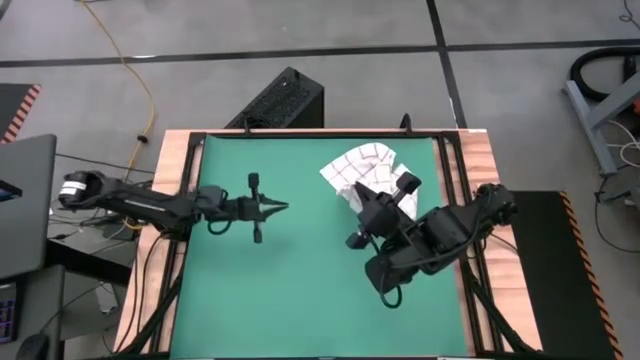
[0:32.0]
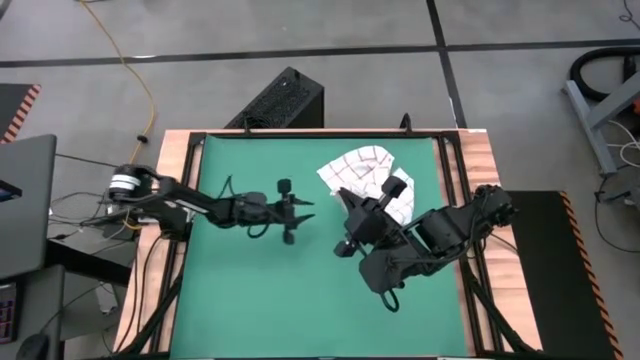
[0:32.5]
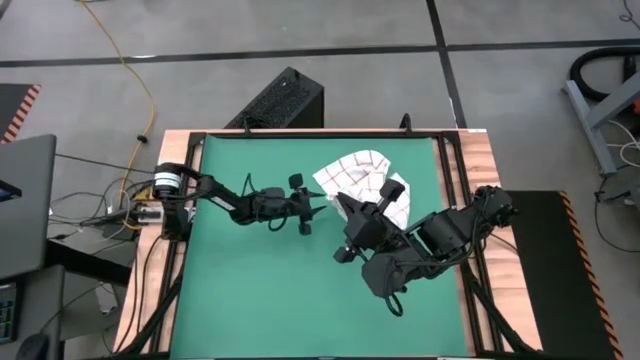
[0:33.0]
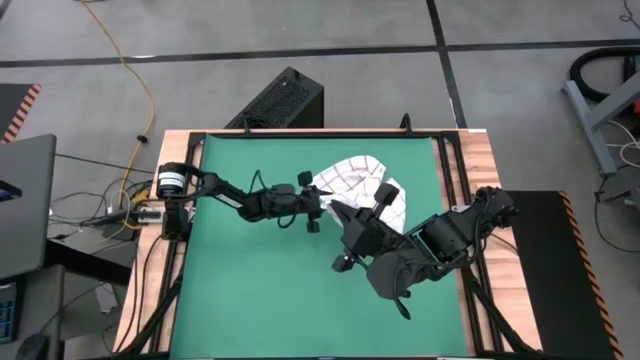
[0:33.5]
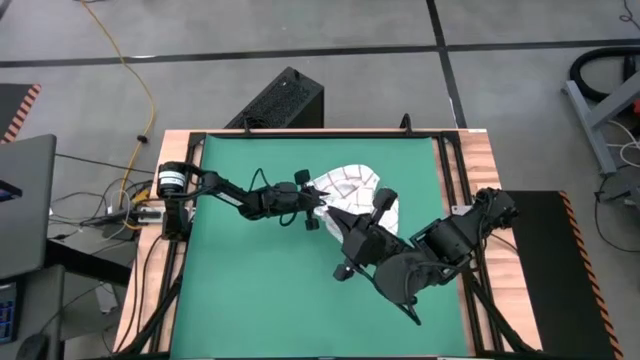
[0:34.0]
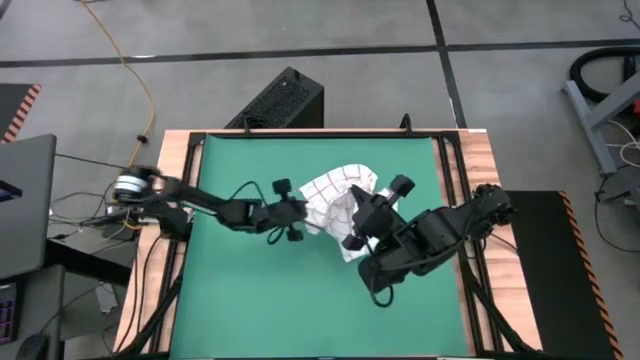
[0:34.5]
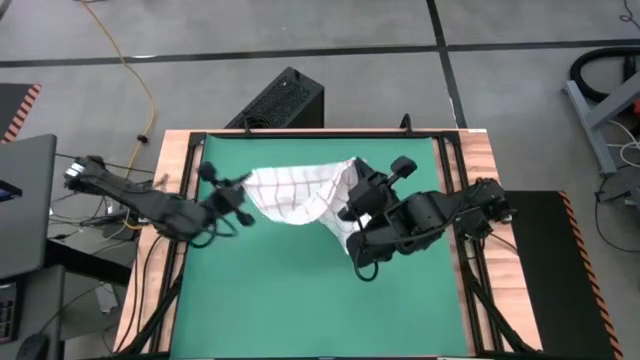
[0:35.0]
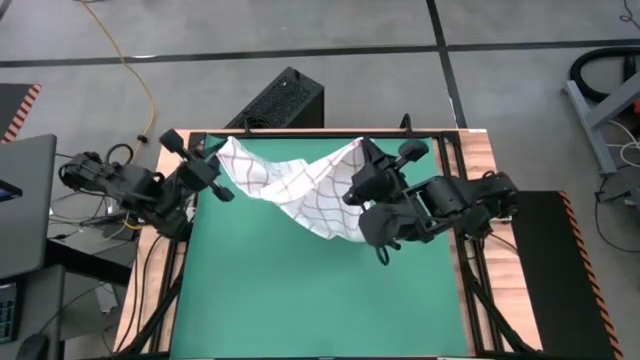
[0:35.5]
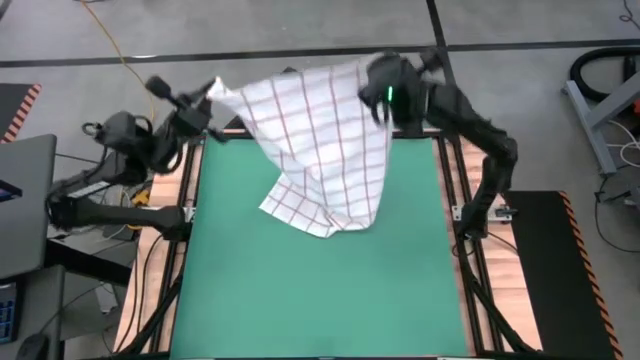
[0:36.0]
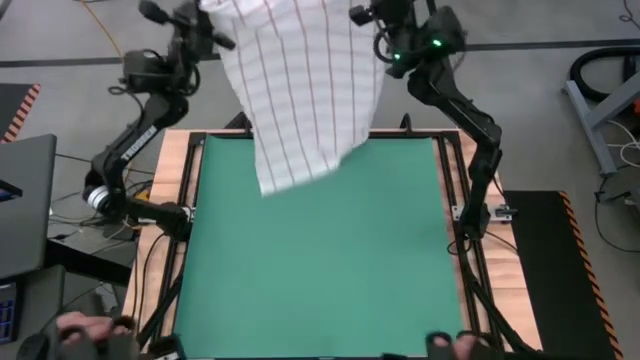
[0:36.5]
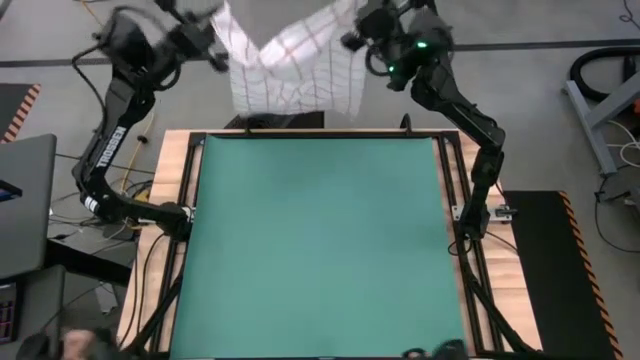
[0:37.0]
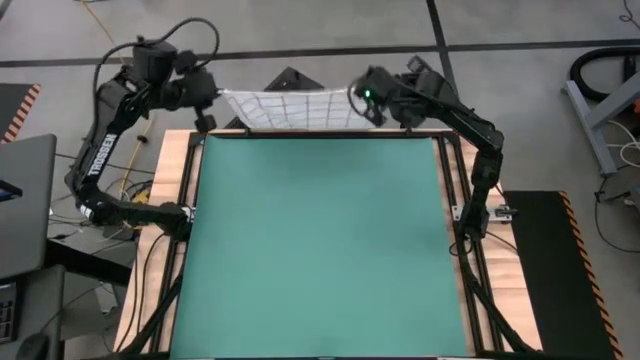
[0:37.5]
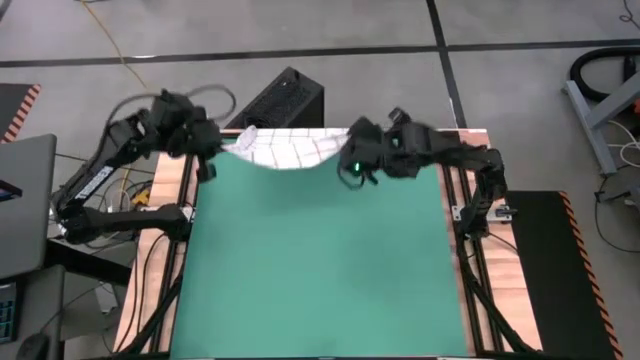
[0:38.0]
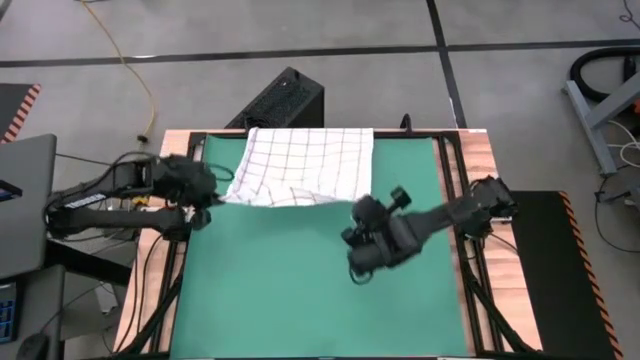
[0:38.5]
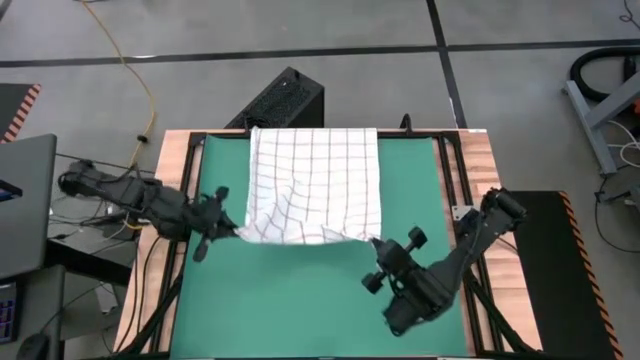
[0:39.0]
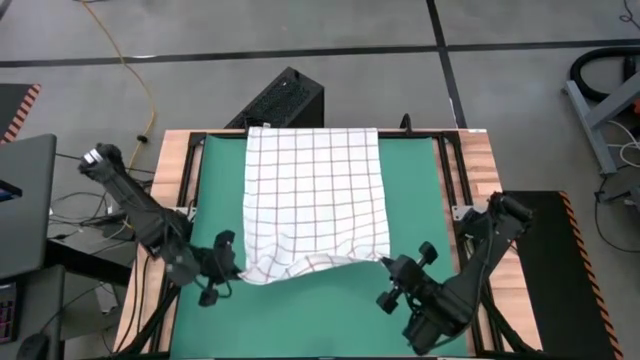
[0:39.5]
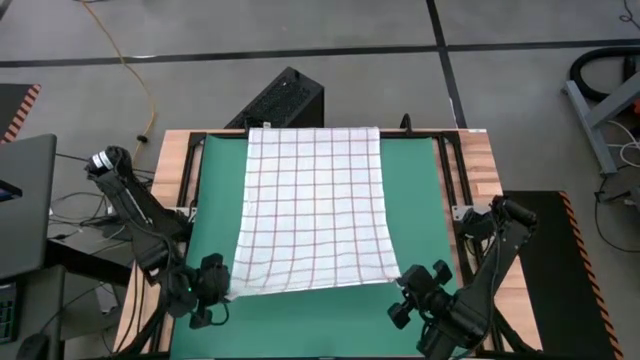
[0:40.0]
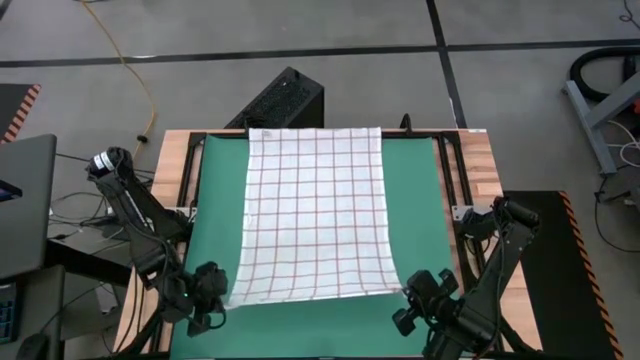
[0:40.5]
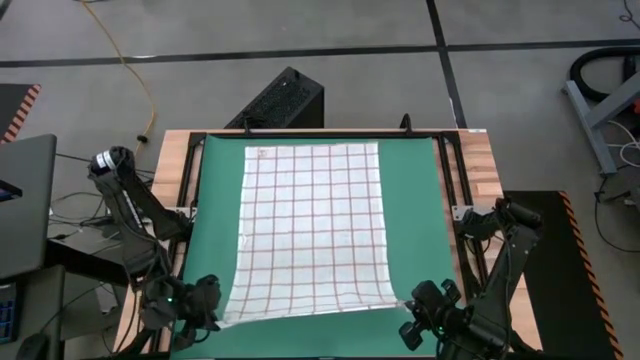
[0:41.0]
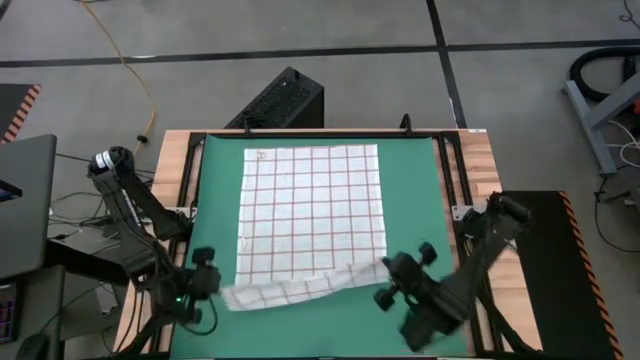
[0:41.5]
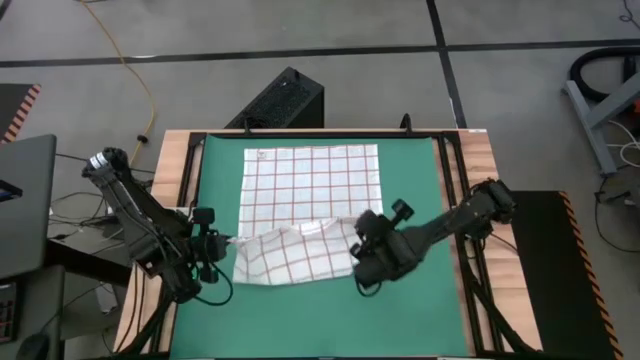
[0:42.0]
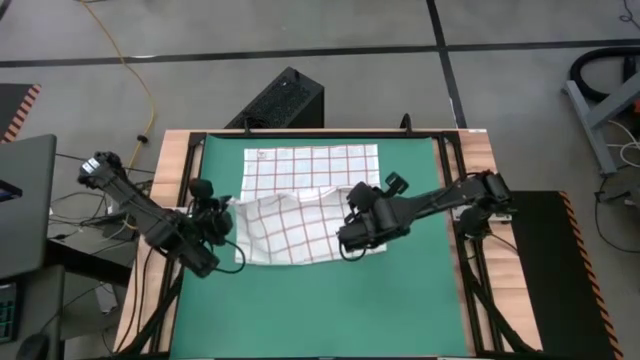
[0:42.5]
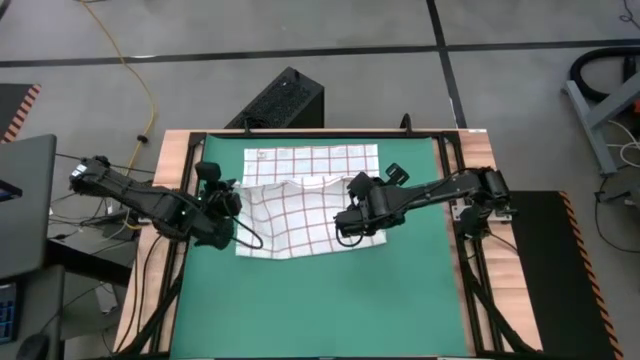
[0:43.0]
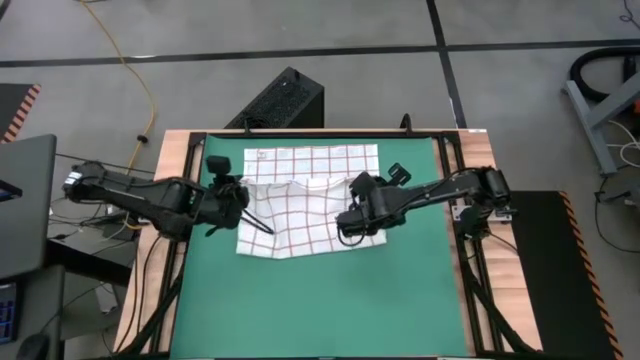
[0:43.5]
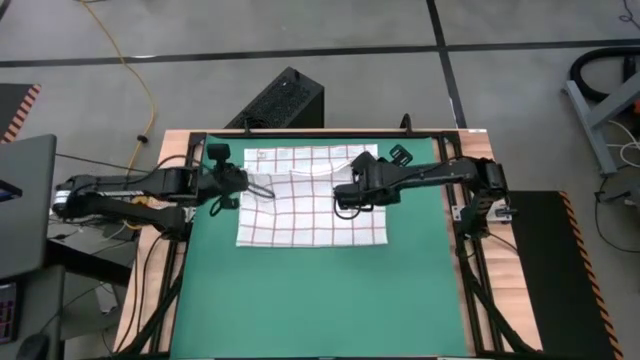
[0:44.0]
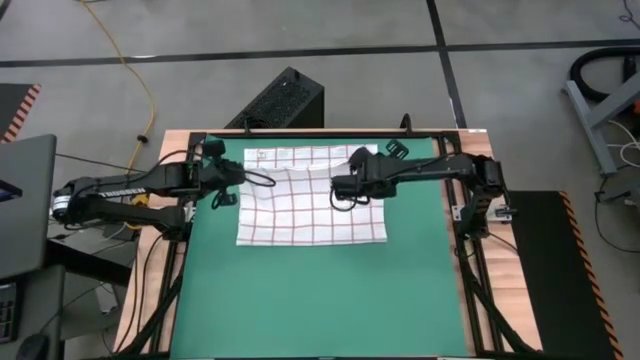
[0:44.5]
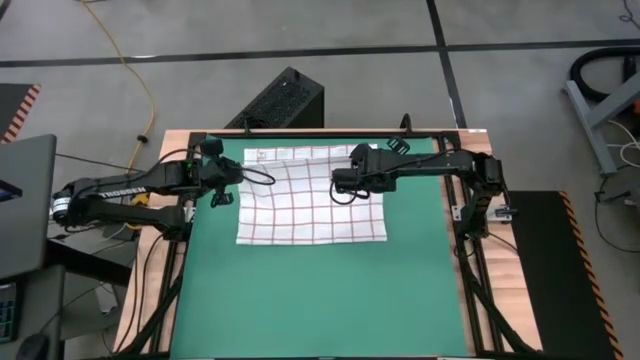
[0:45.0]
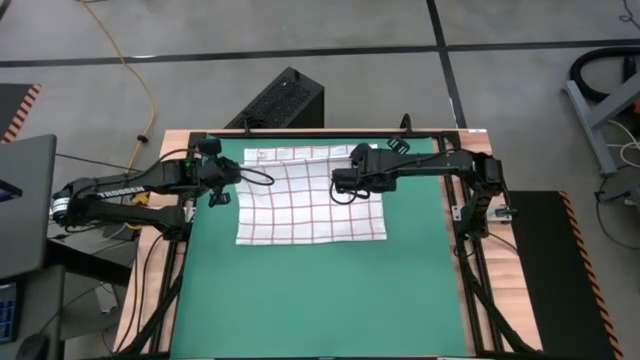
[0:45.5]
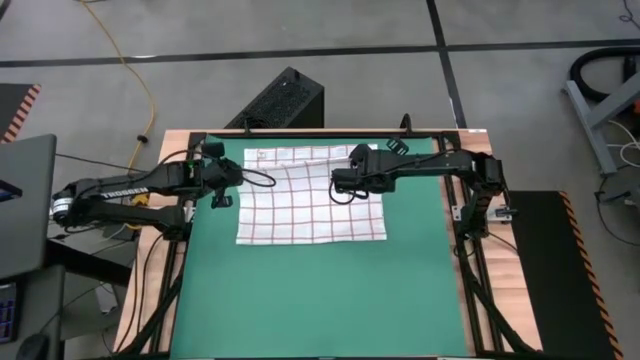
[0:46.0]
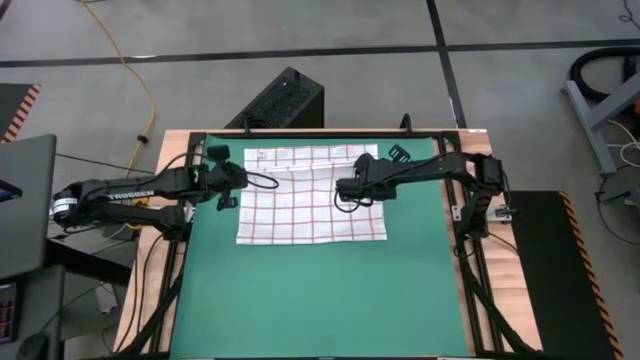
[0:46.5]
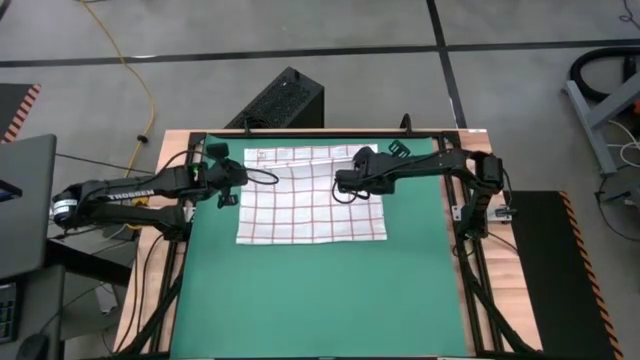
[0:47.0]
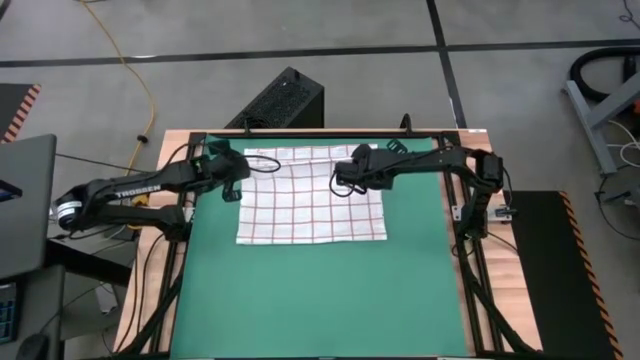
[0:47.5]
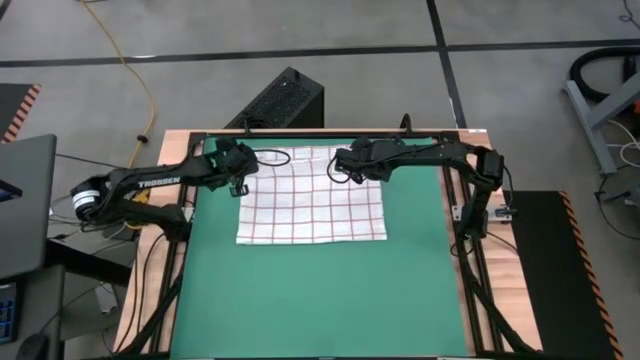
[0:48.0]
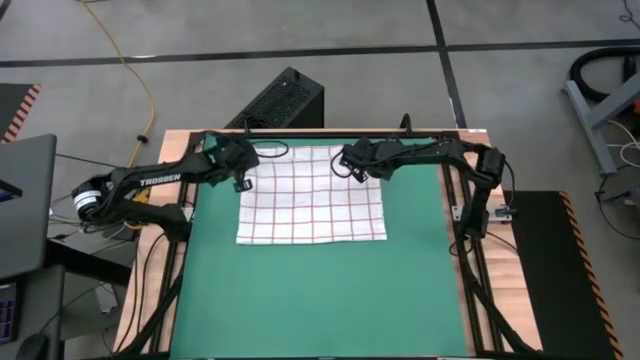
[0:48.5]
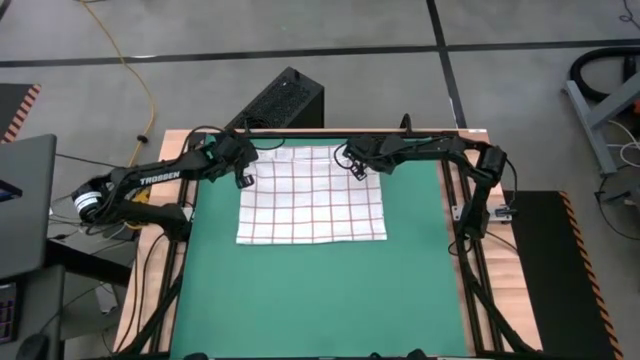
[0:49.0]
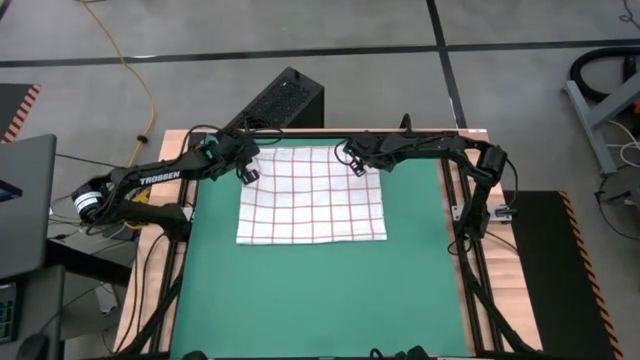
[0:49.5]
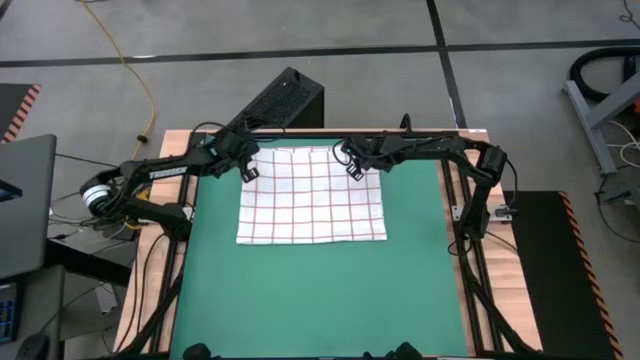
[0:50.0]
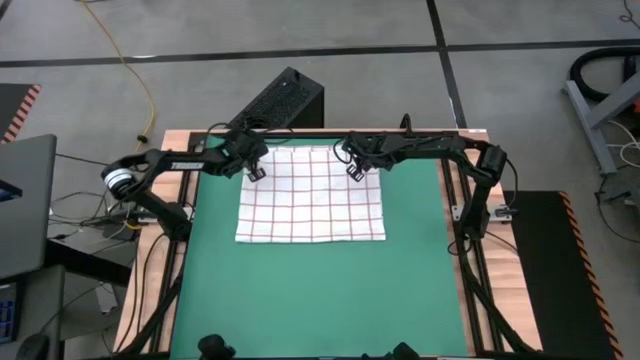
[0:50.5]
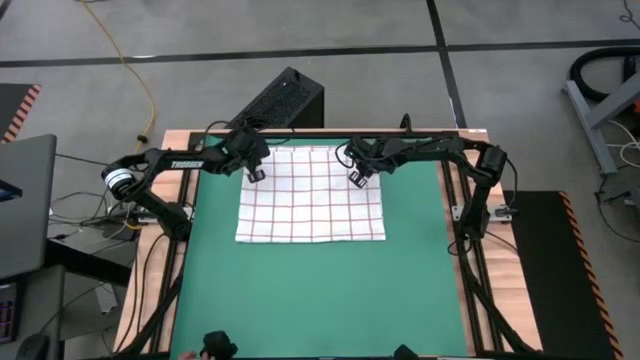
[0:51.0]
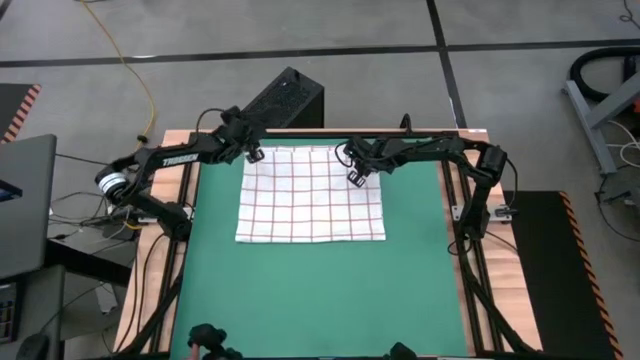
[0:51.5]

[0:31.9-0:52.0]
Task: Roll towel into tight, uniform cylinder
Fold the white towel

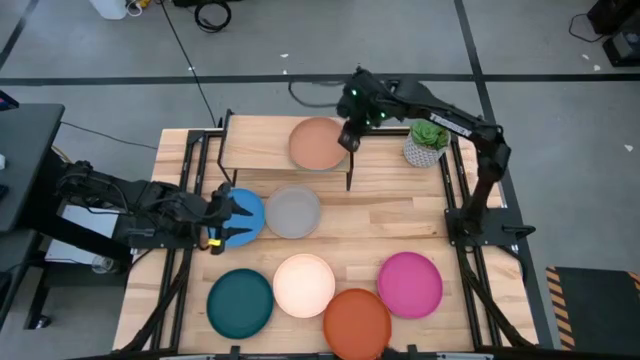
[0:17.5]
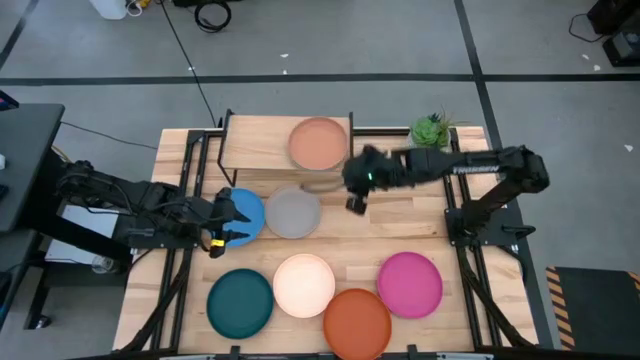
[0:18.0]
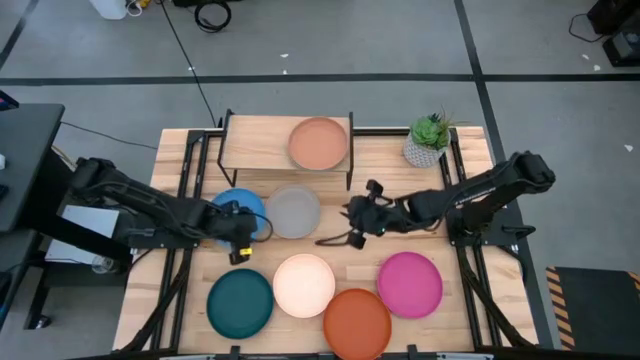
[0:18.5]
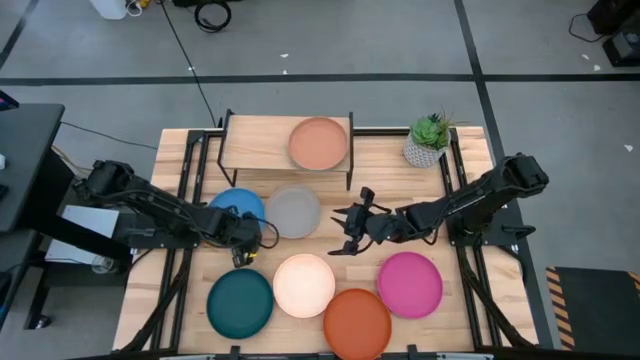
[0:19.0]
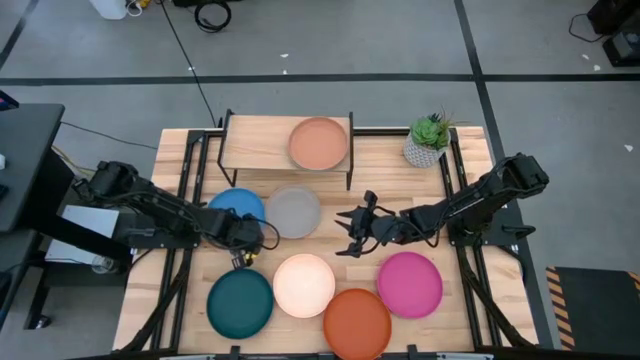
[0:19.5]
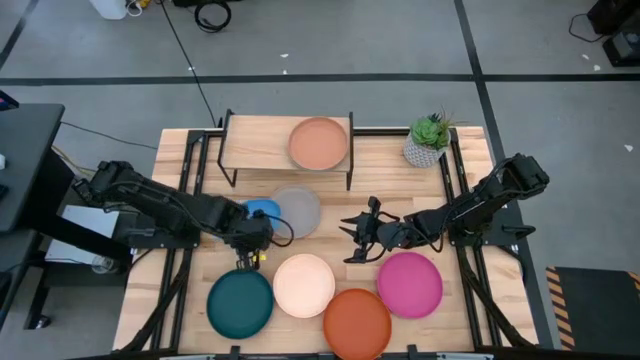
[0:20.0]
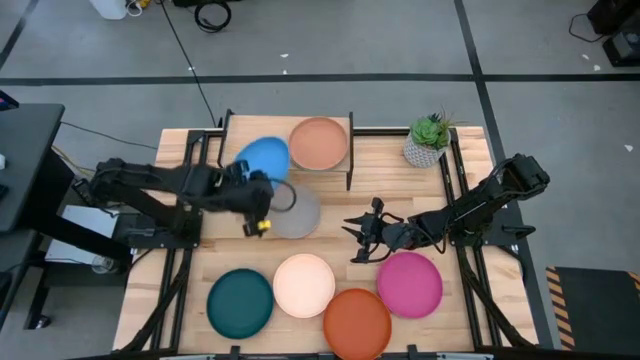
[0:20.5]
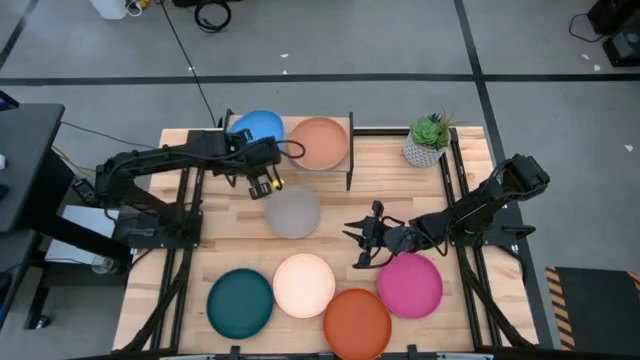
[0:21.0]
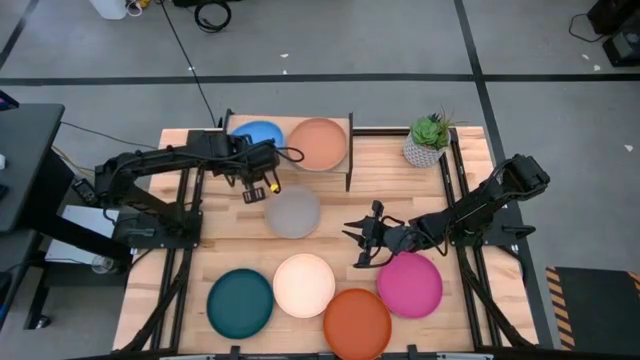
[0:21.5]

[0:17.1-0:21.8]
Task: Place and stack plates onto a shelf
Put the blue plate on the shelf
